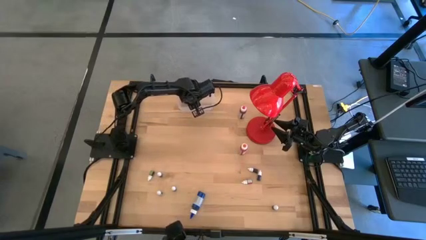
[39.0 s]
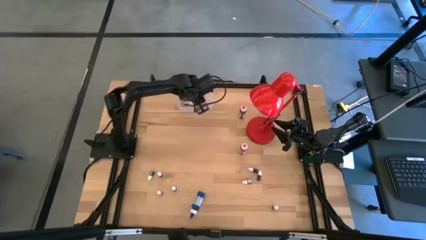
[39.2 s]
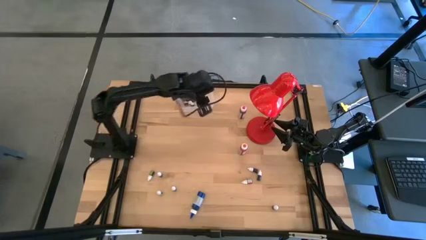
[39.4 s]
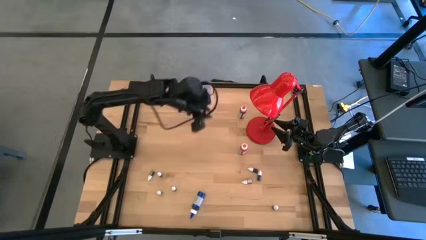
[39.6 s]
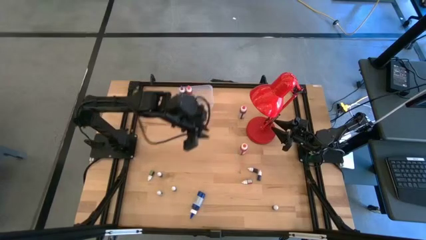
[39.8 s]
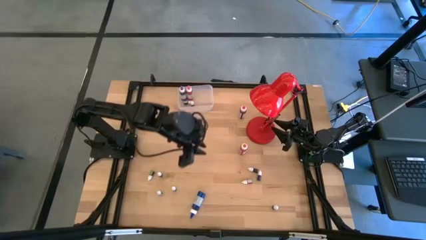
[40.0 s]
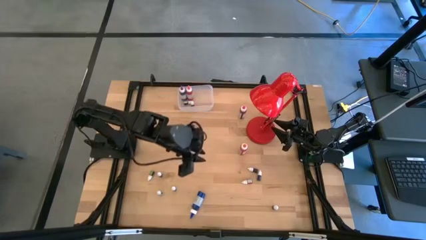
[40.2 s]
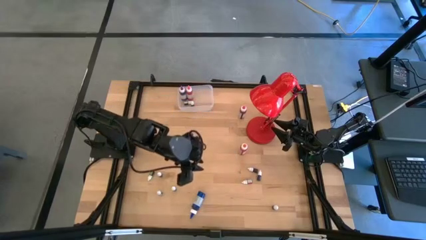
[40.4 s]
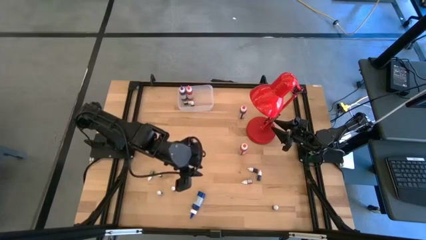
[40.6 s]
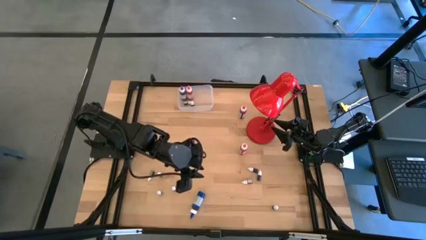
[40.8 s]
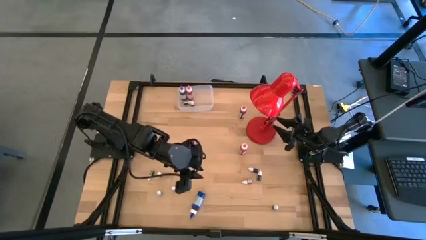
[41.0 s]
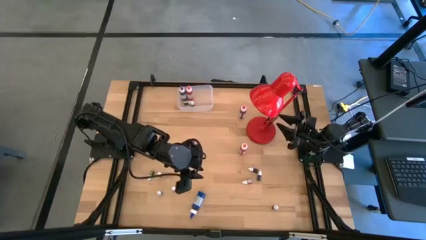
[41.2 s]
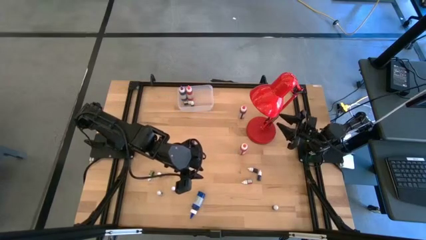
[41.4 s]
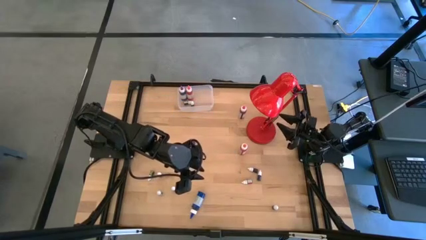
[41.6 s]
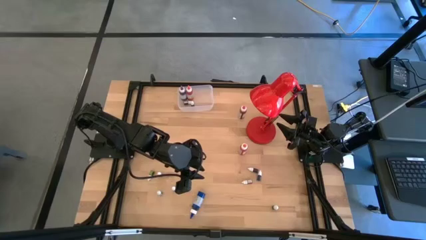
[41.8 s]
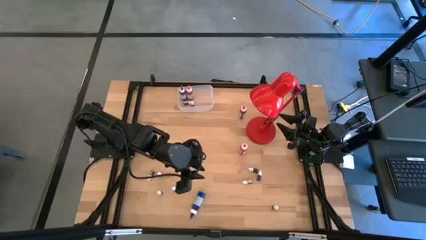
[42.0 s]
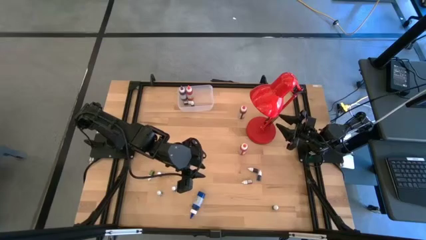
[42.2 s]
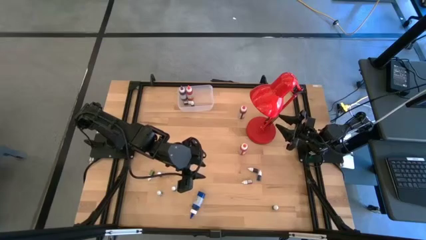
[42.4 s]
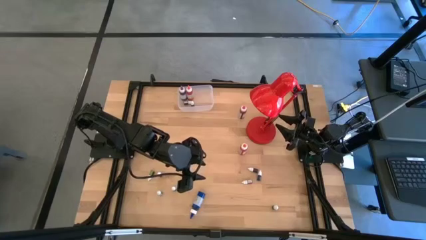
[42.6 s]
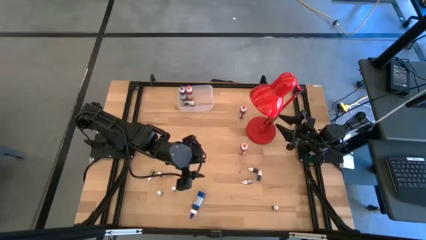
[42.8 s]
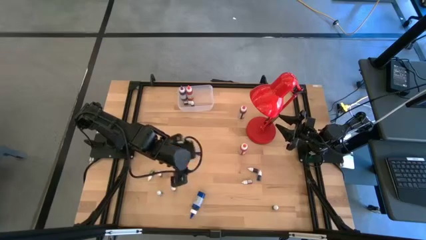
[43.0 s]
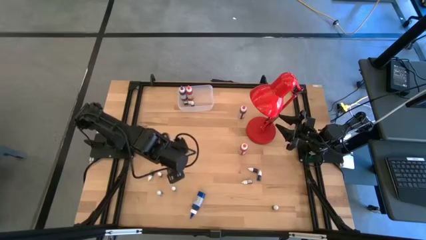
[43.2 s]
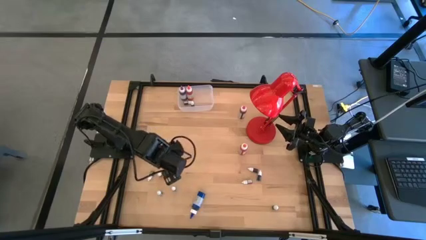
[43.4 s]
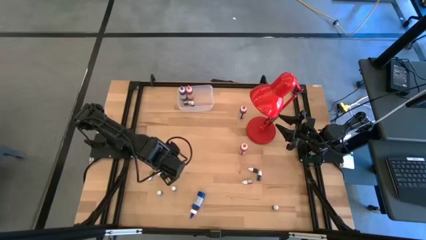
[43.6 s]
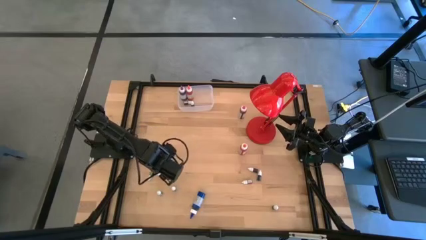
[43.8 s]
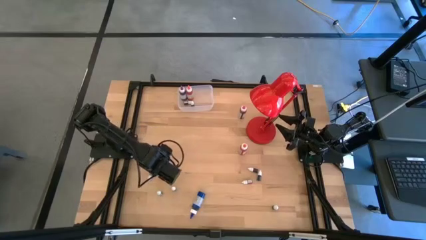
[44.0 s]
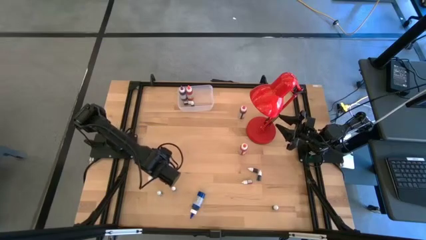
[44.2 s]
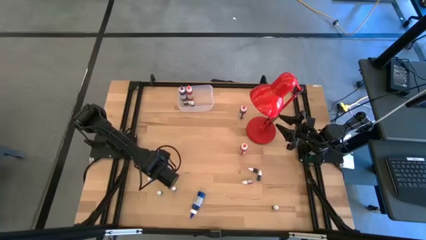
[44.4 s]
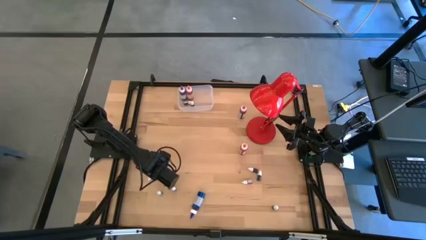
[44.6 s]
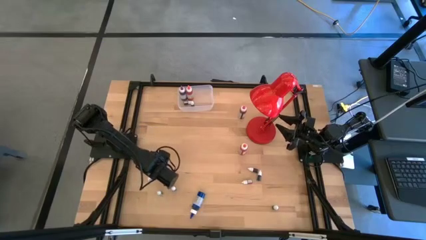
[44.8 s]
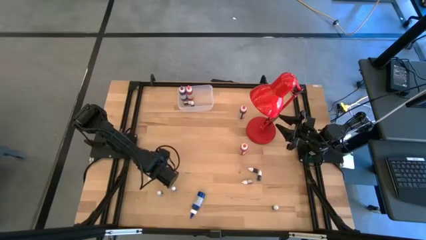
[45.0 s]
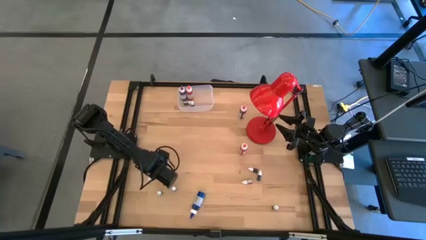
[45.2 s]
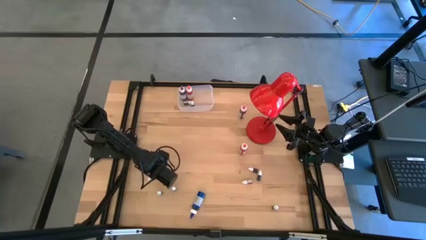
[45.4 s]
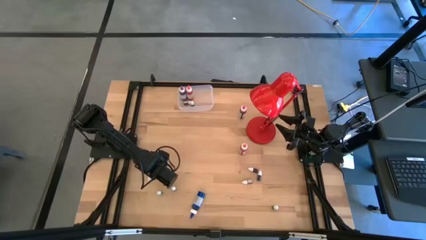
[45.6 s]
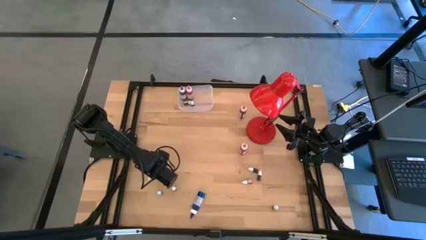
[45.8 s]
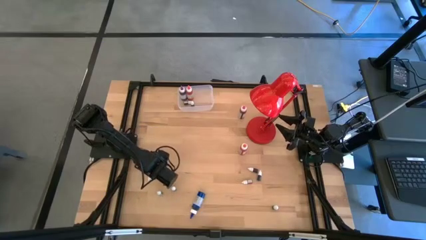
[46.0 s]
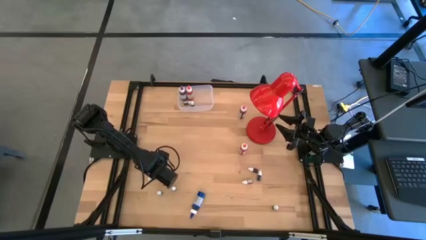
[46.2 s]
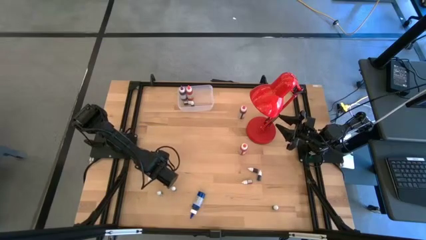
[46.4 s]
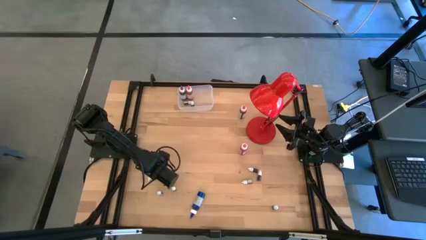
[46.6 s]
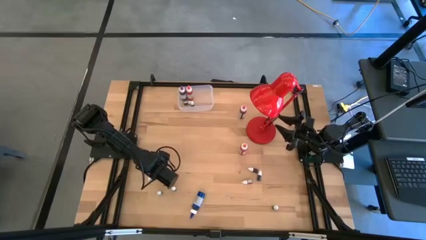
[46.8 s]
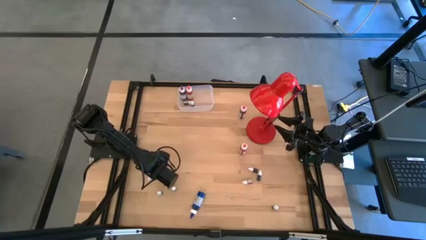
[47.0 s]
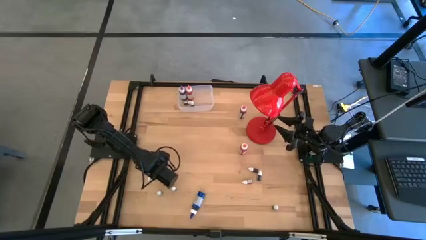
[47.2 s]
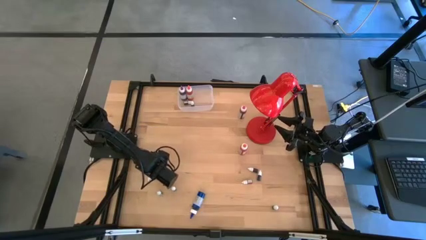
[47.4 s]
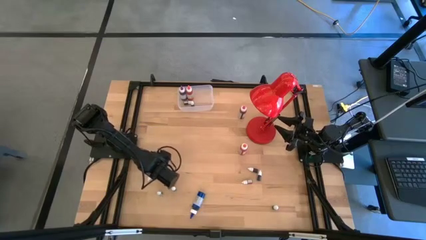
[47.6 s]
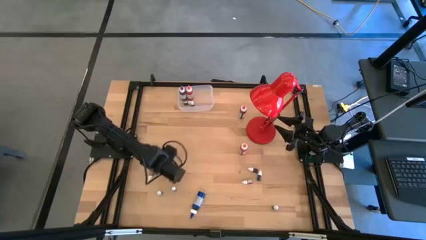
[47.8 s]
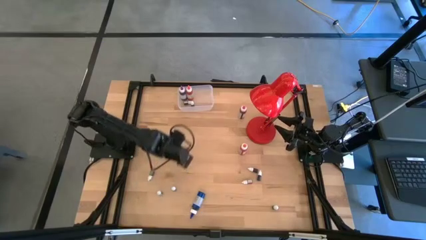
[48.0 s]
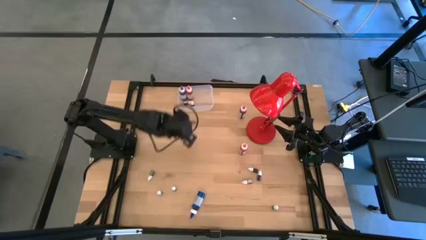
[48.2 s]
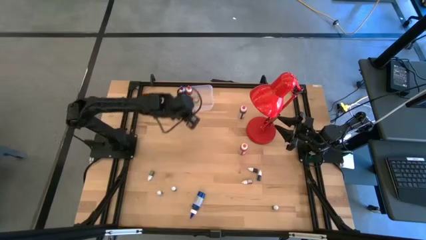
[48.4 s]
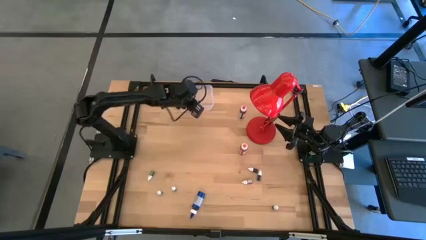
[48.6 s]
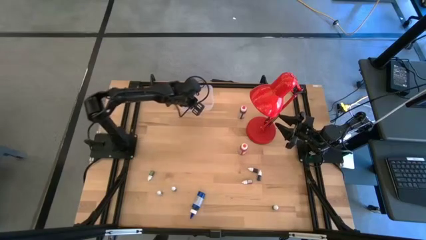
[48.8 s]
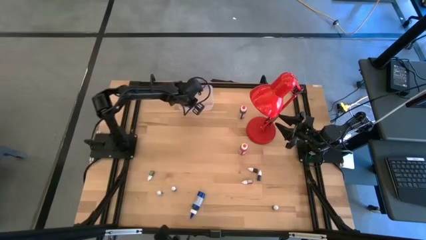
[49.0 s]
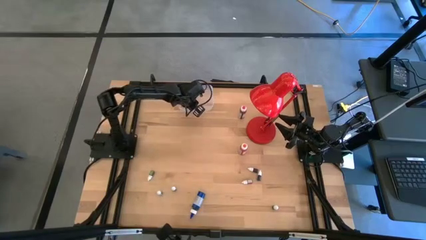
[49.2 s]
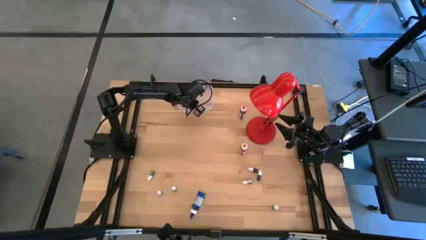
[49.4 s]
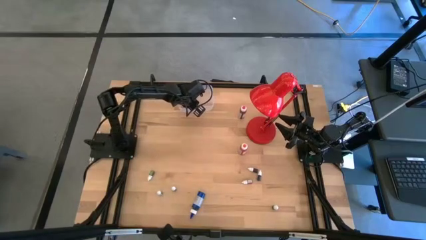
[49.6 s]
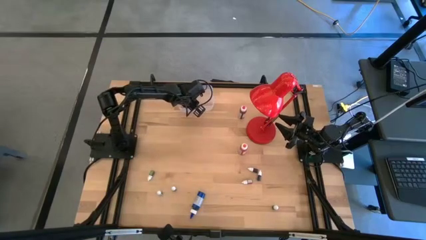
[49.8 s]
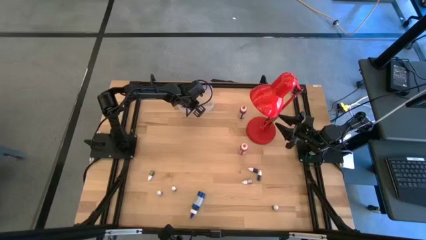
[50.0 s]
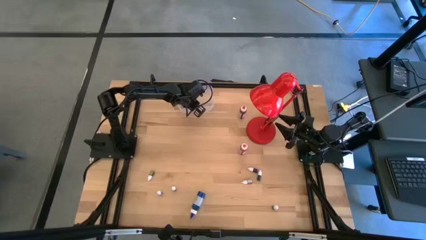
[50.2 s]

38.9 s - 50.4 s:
Task: Pick & Place food coloring
Put the small purple food coloring bottle into the transparent bin

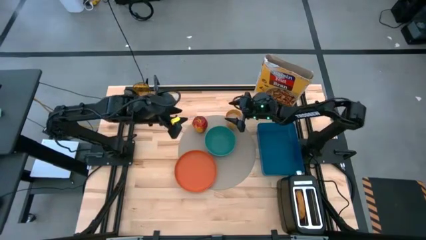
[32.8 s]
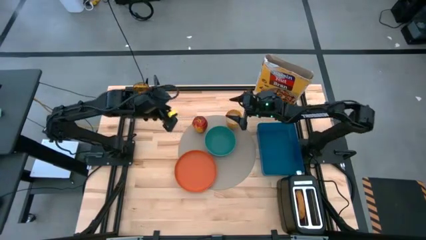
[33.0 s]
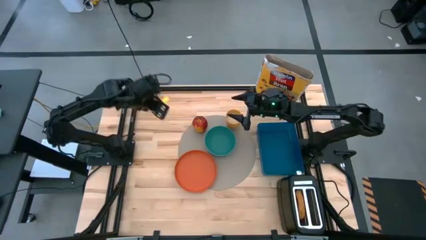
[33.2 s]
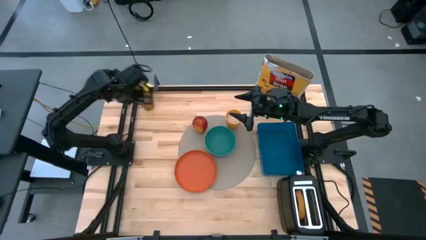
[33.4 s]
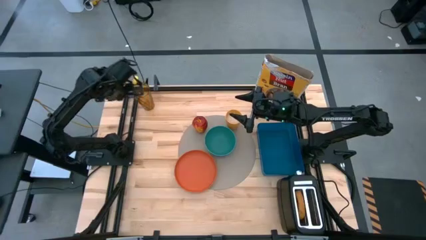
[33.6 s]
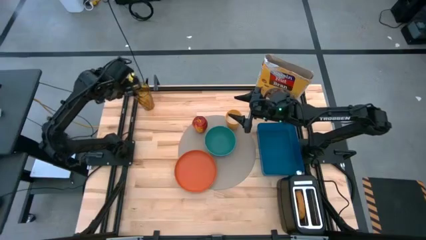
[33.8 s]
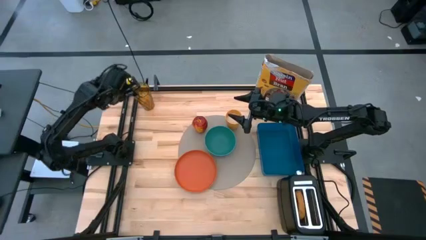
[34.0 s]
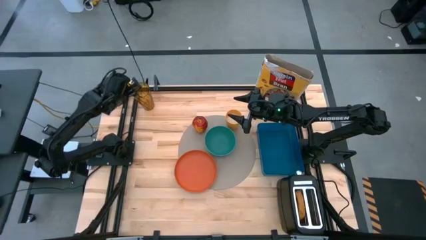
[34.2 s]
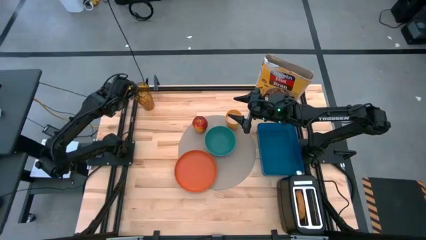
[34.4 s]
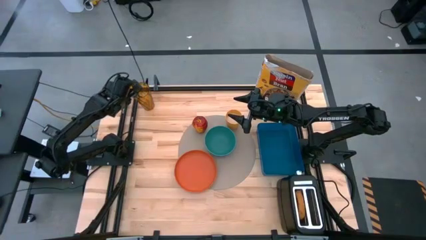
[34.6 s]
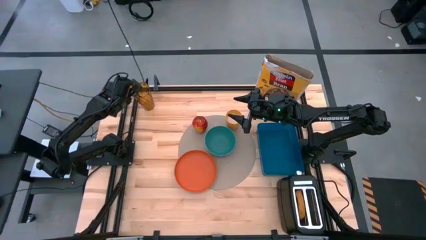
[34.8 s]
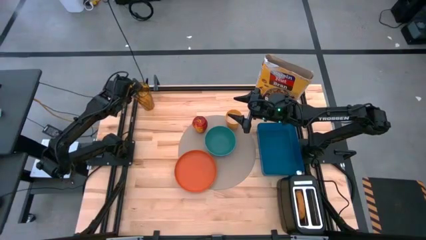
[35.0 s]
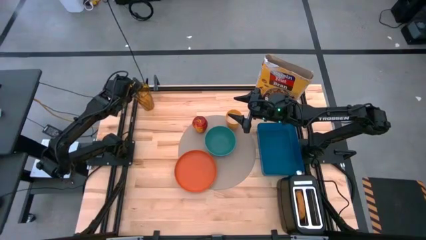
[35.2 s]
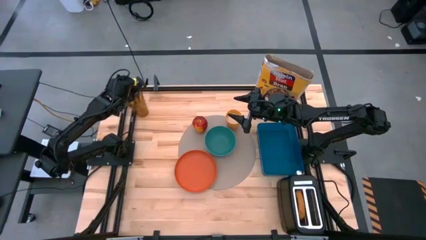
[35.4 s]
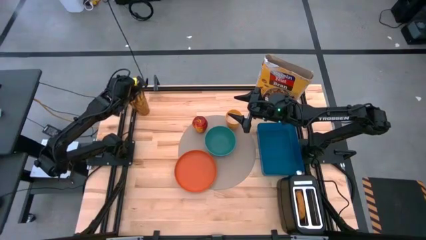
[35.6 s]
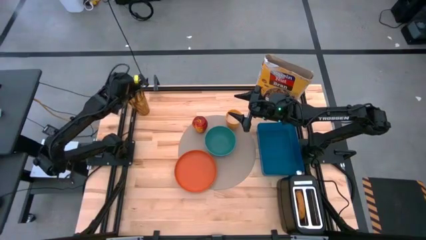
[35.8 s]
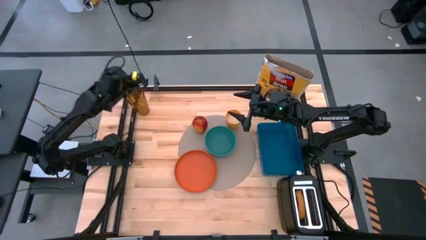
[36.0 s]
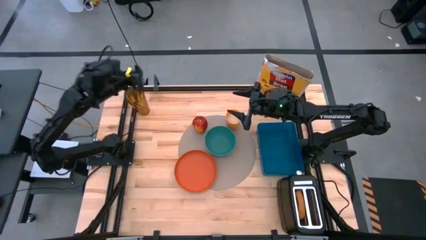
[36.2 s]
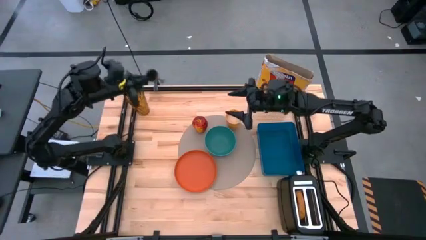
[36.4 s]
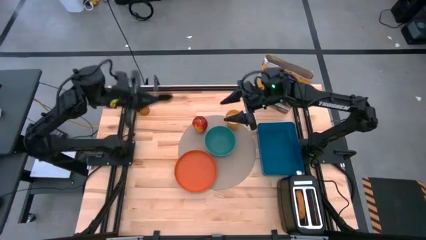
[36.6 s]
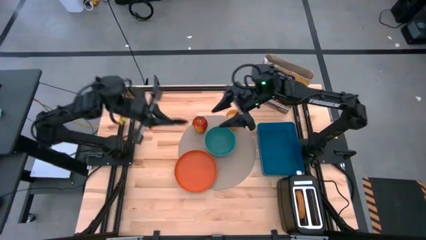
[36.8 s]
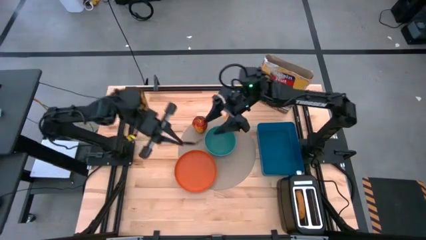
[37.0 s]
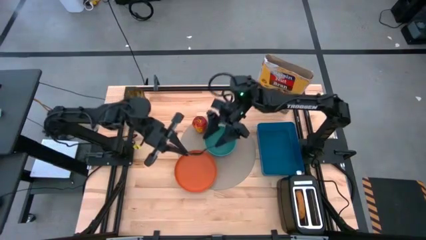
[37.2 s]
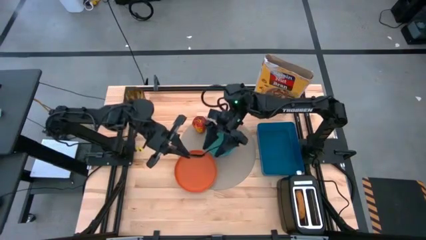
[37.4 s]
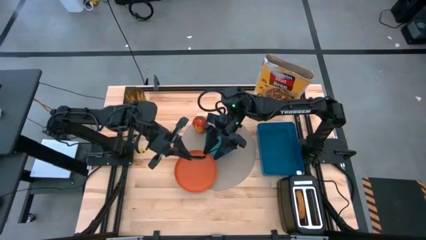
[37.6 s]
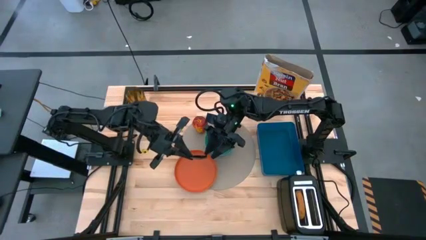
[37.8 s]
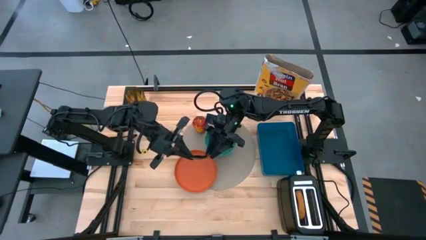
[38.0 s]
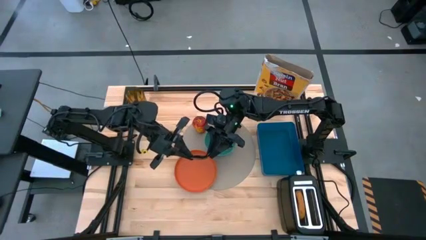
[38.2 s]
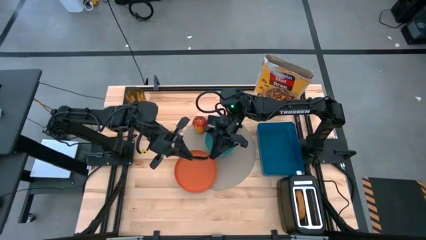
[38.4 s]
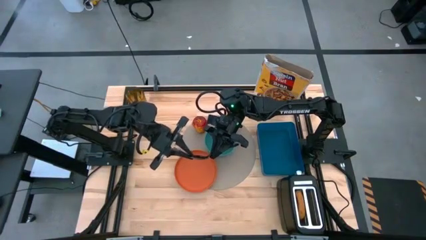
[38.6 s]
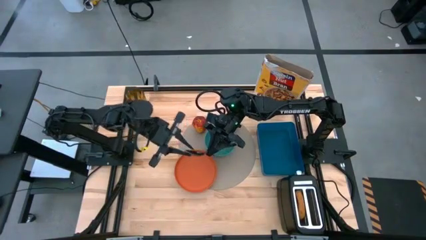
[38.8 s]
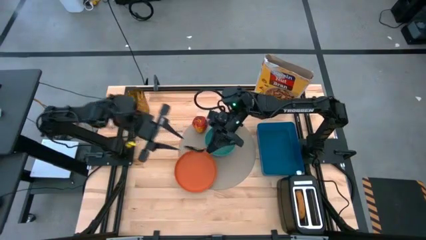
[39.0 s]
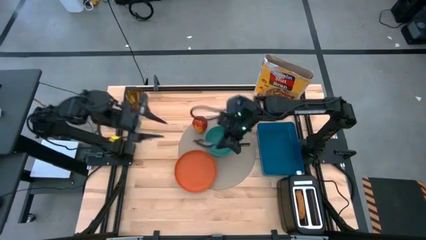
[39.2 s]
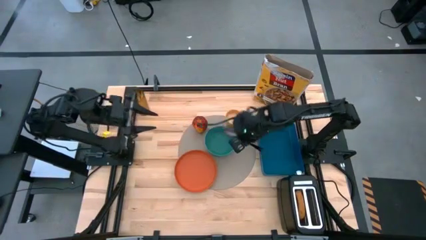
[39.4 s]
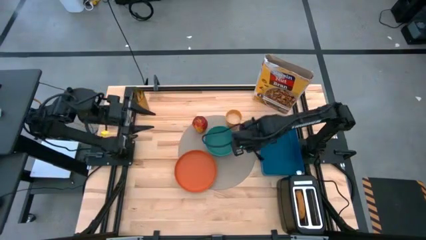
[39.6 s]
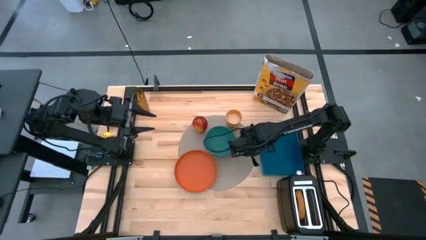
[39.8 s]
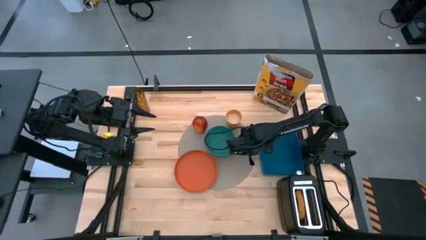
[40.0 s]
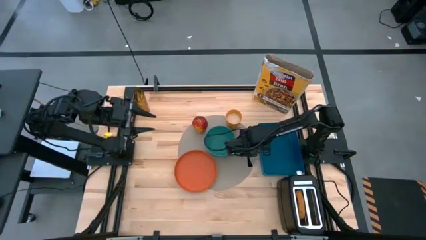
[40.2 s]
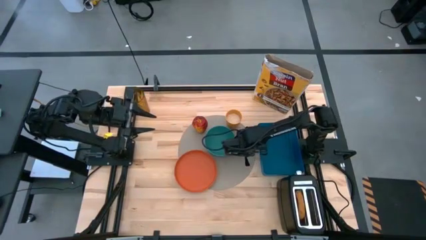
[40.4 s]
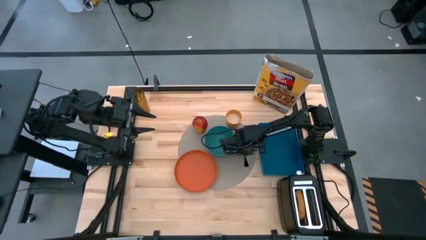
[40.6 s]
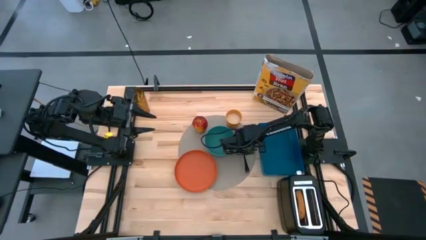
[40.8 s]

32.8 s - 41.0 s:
Task: Arrange a breakfast setting
Put the black spoon to the right of the green bowl on the brown table mat
